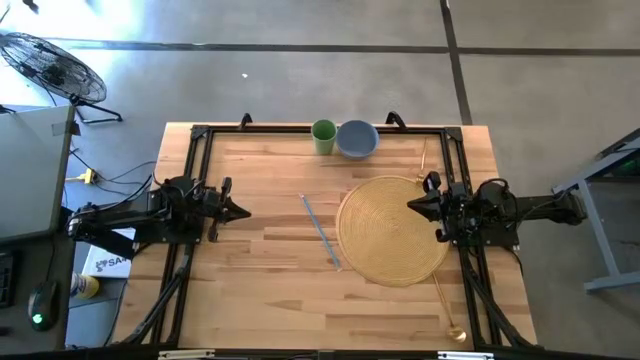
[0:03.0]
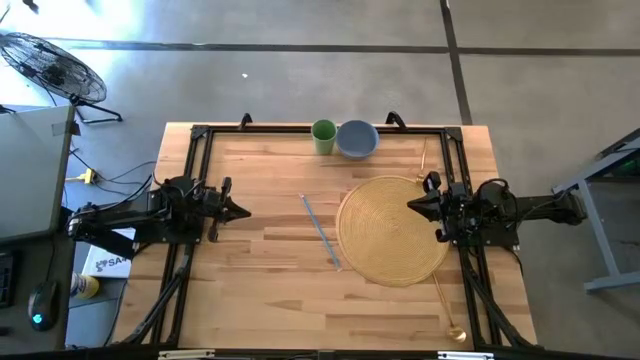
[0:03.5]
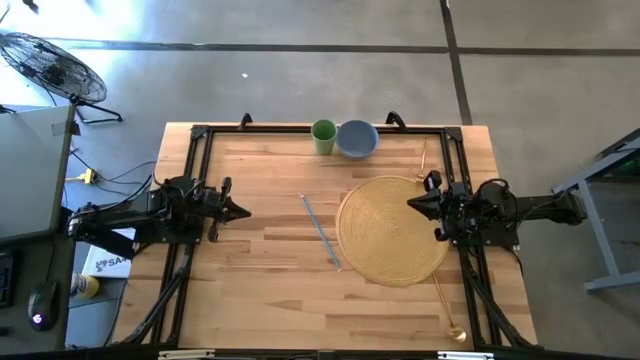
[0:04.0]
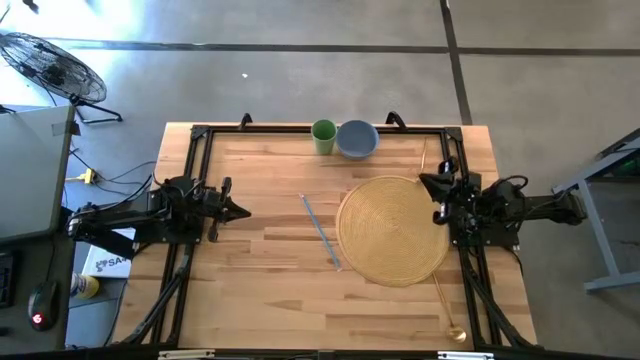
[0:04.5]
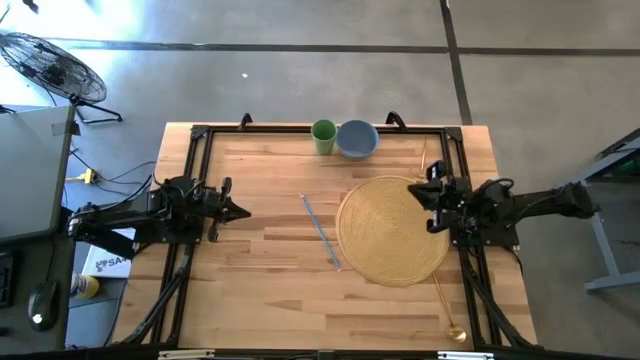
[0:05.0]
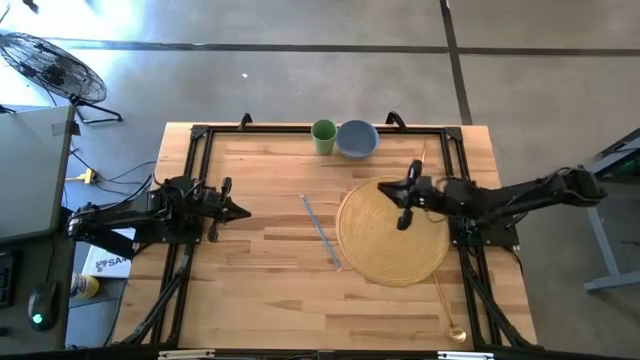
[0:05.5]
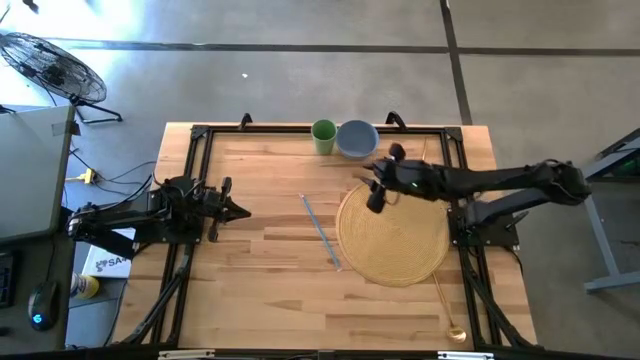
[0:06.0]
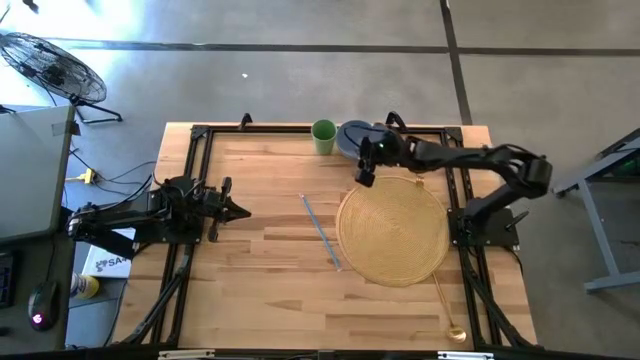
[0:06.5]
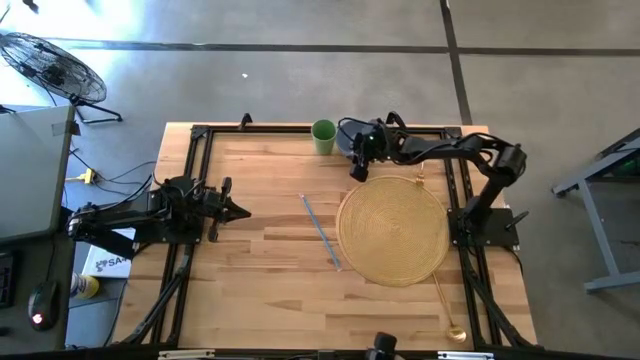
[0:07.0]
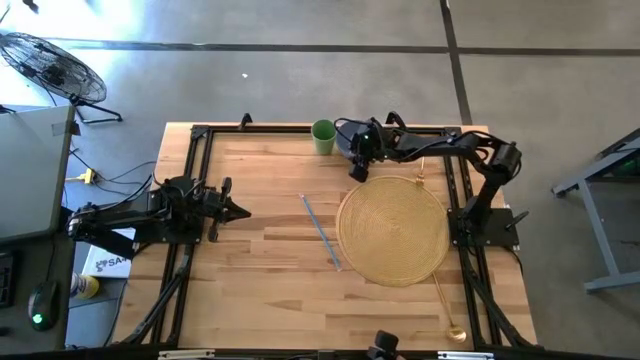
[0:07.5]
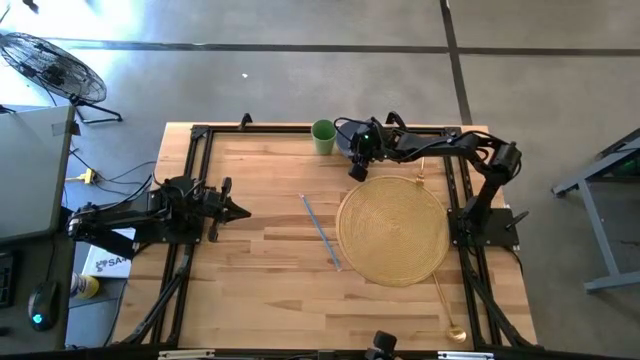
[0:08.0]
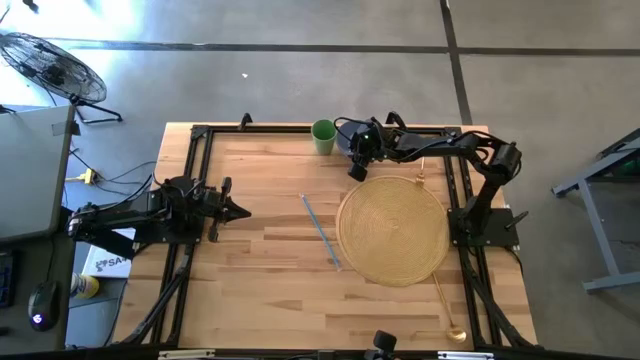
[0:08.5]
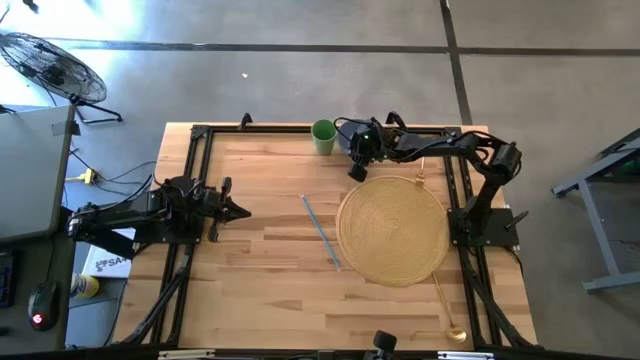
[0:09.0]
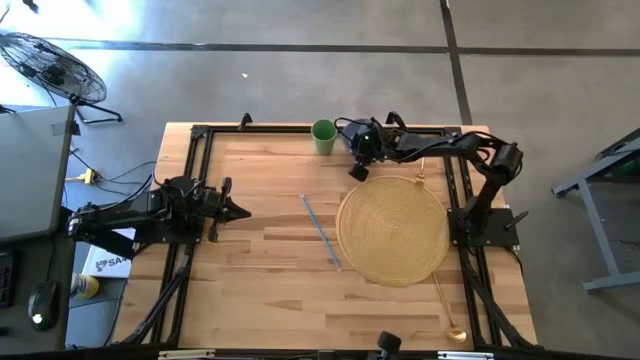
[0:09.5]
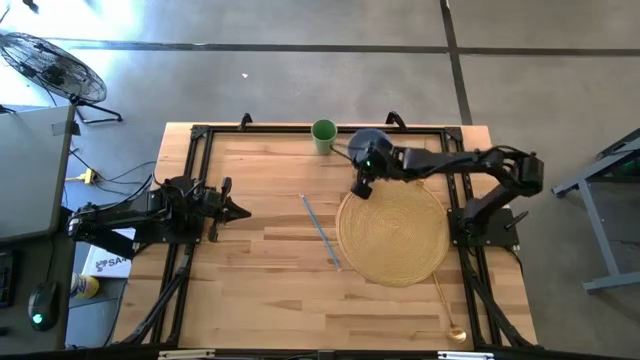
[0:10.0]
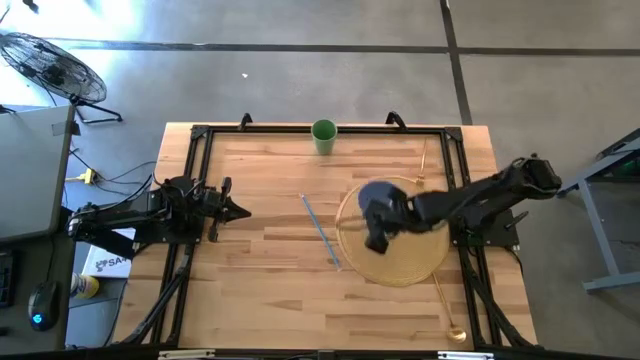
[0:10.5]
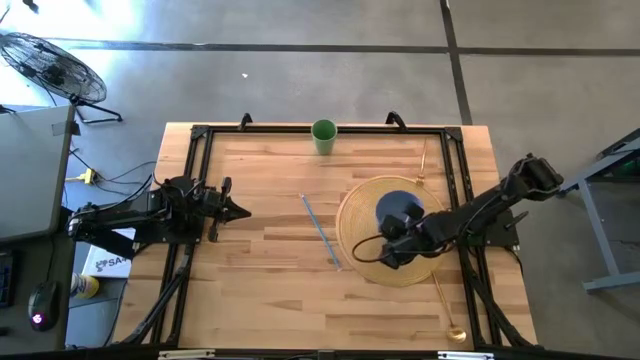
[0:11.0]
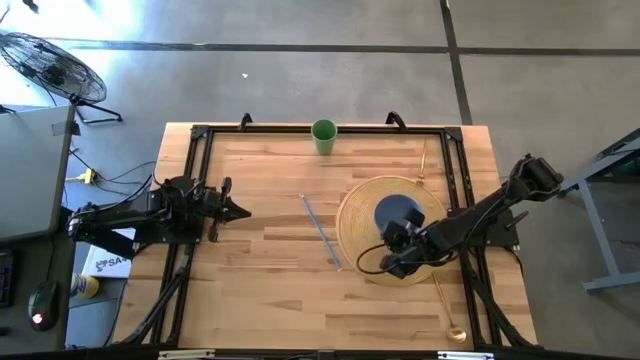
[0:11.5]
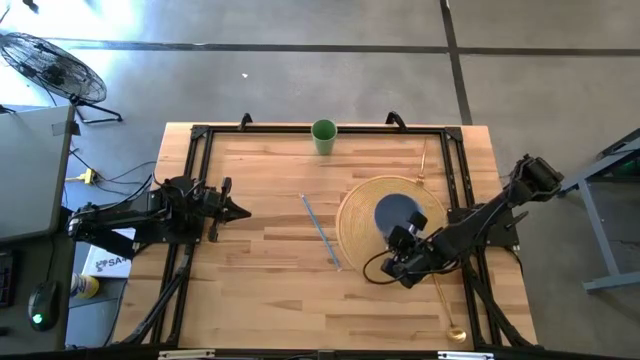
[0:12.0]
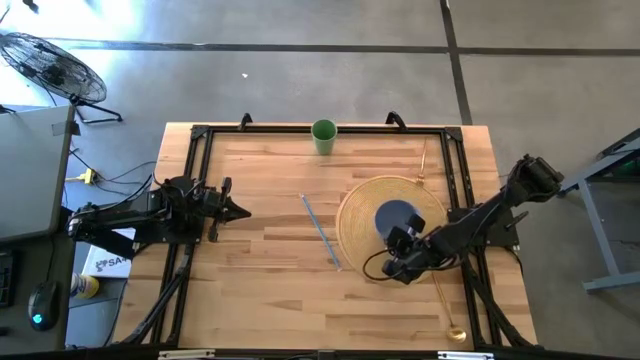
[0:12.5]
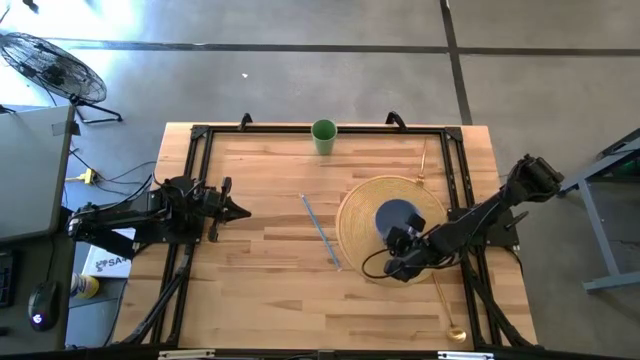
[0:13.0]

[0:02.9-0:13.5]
Task: Pick & Place Utensil
Put the blue bowl on the brown mat

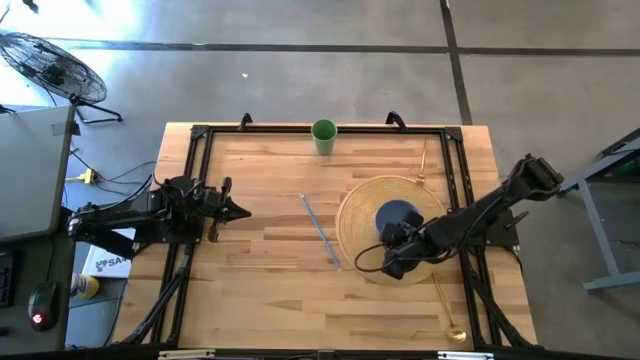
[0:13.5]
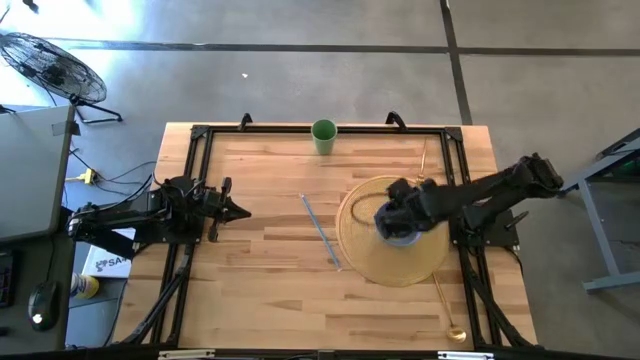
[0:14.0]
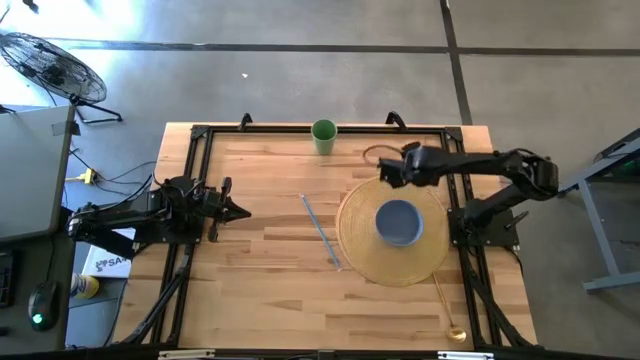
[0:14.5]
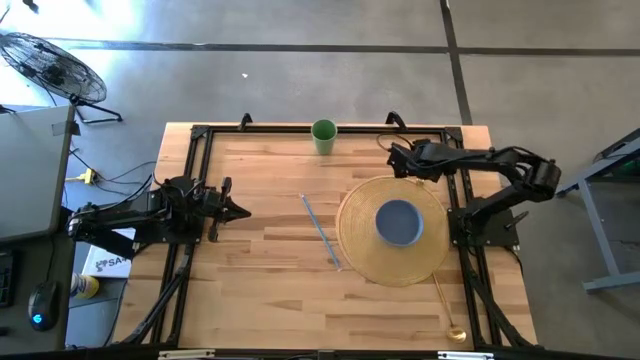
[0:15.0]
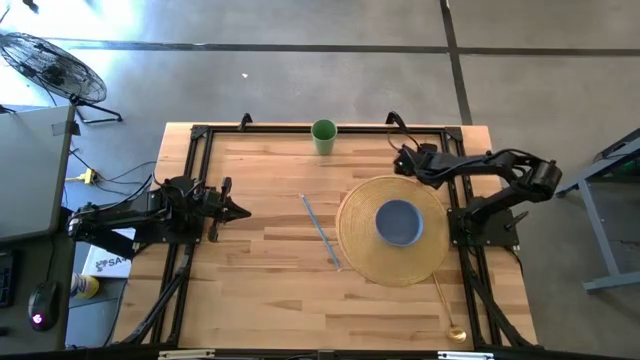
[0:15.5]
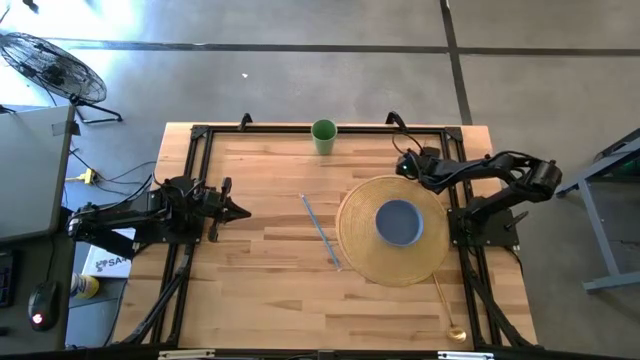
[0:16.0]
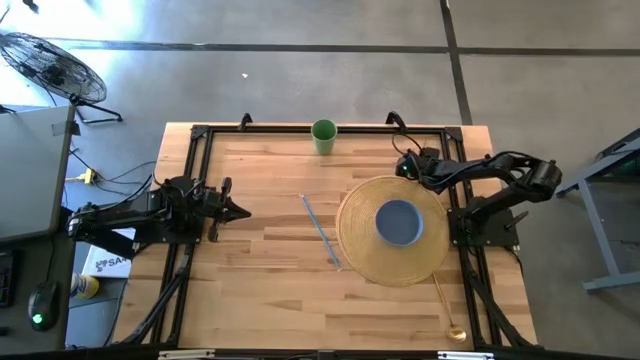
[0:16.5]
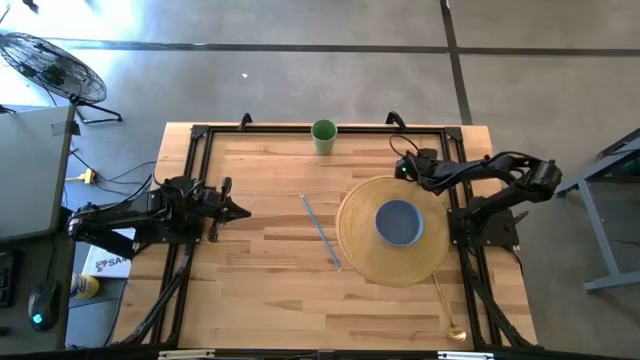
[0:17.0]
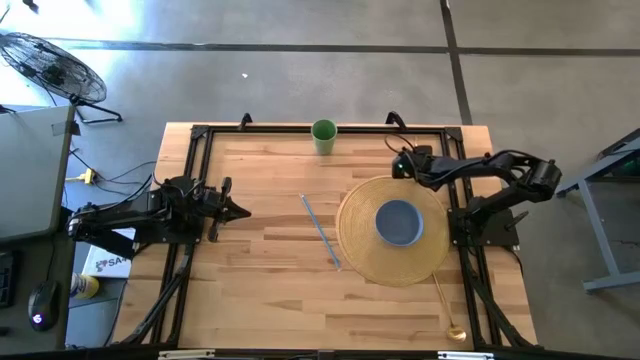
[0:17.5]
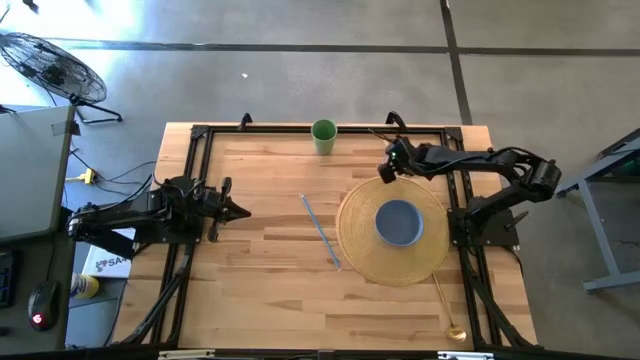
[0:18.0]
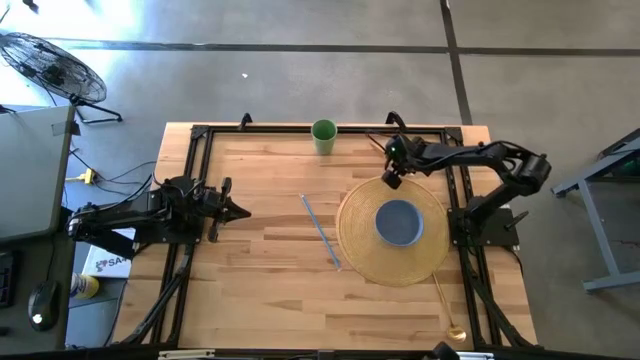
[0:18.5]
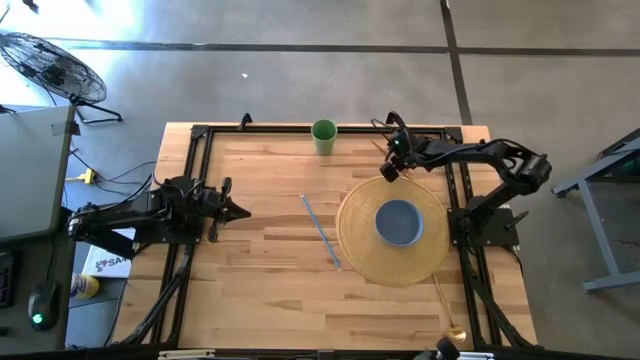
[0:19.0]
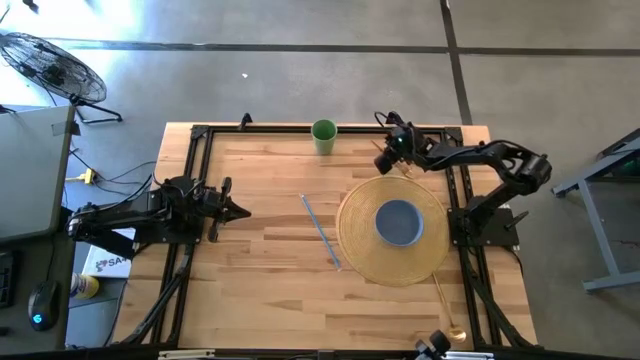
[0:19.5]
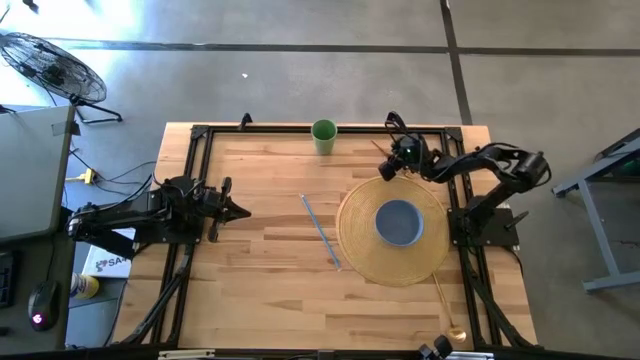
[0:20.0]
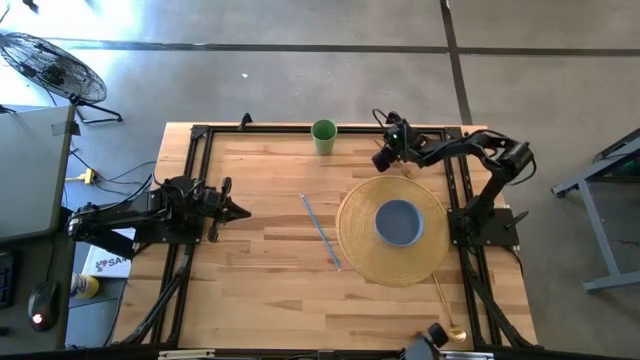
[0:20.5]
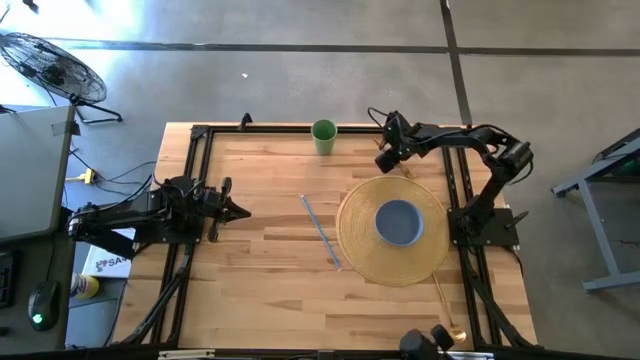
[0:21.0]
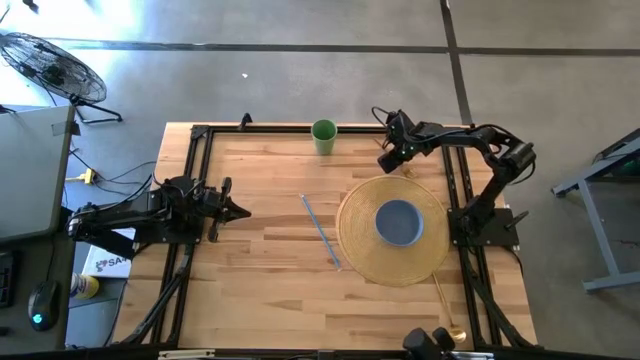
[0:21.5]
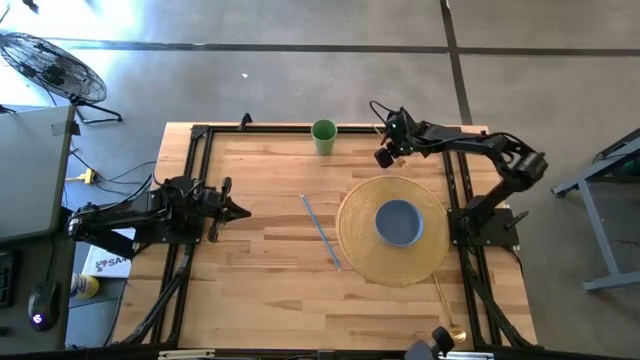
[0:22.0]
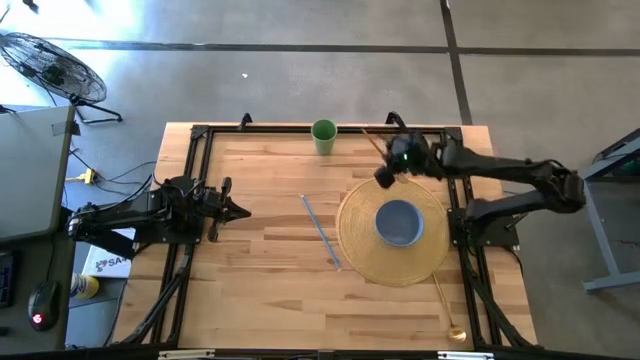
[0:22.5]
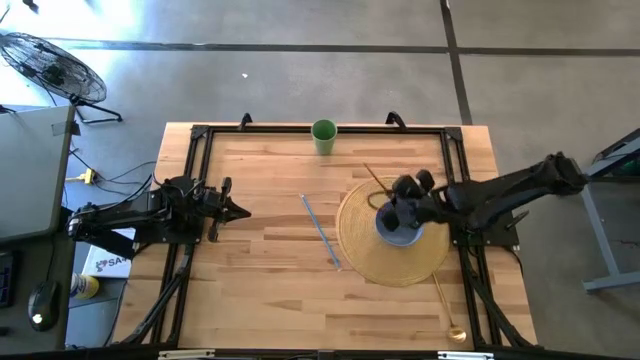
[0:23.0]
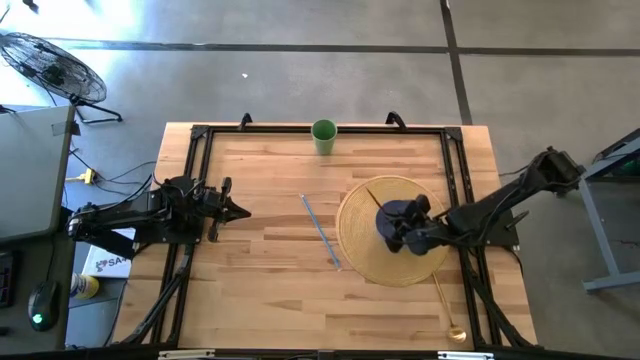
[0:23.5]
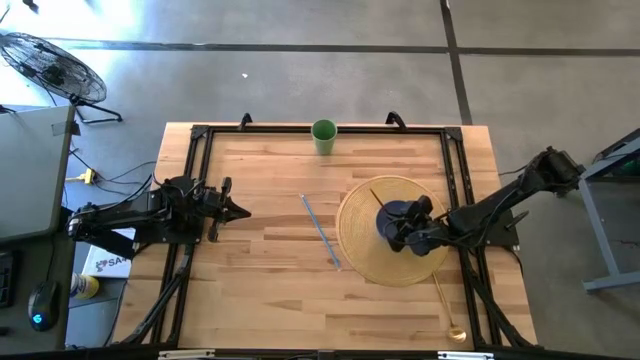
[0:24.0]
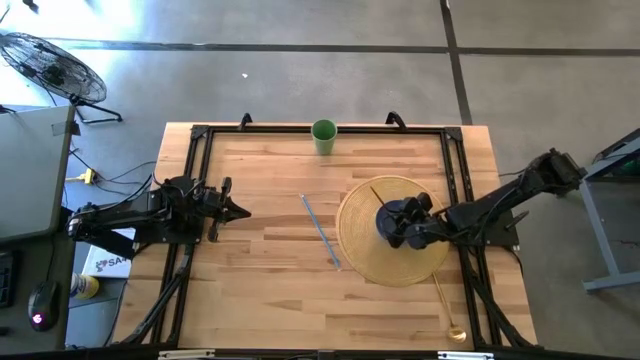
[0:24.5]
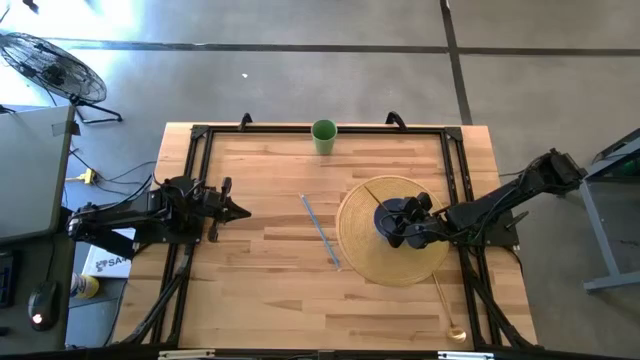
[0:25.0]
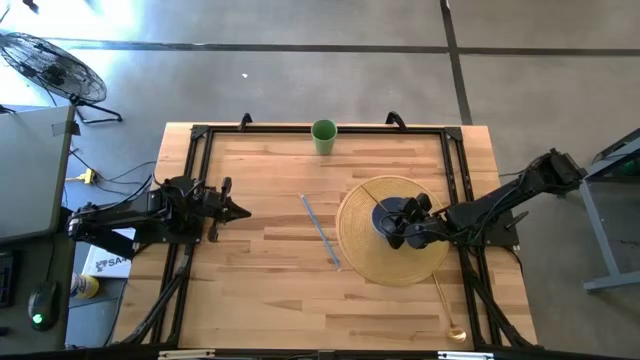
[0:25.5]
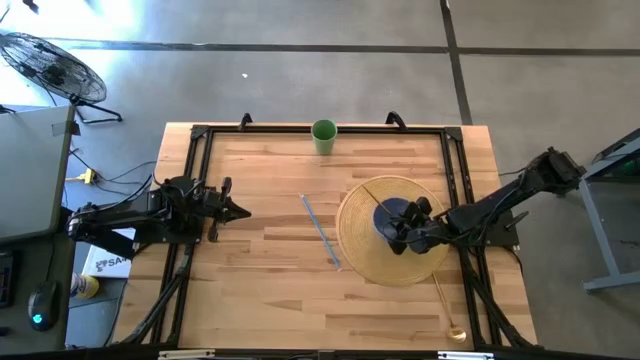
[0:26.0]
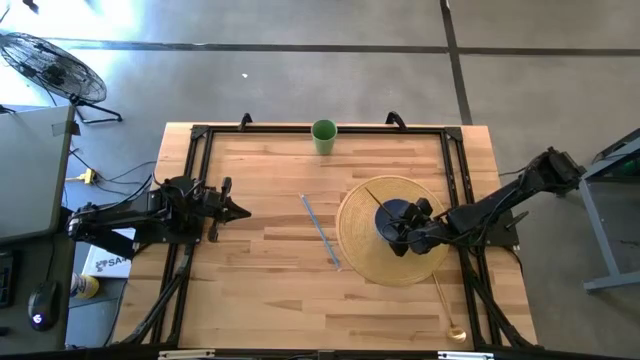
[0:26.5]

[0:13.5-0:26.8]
Put the gold fork into the blue bowl on the brown mat
